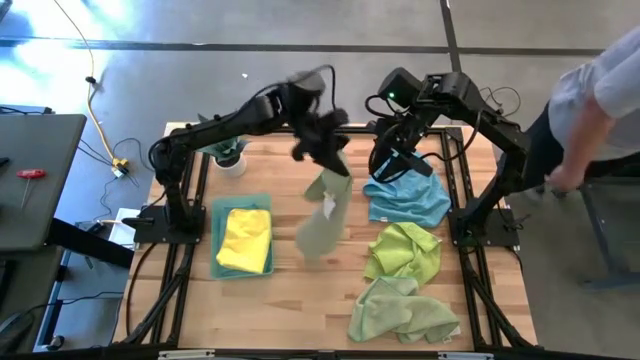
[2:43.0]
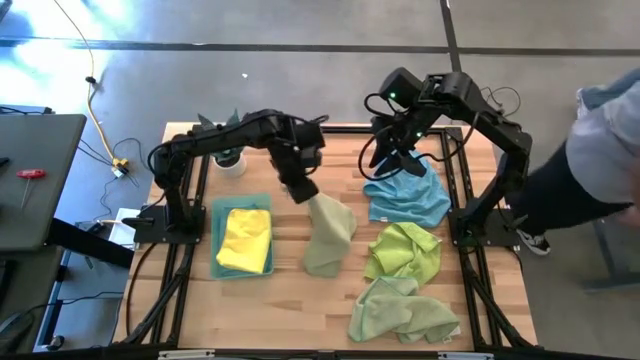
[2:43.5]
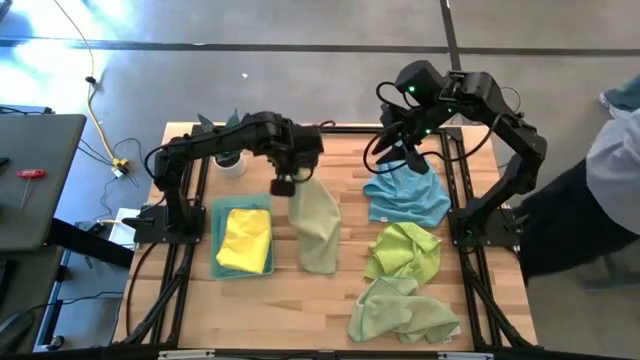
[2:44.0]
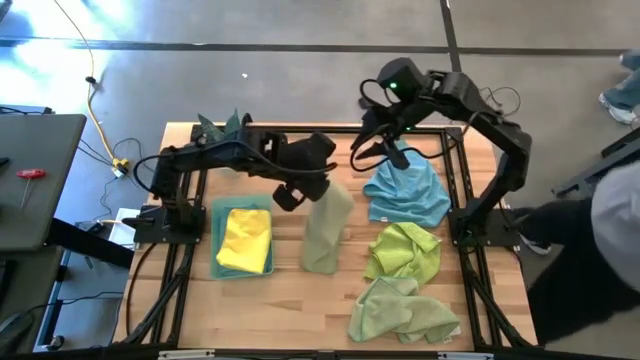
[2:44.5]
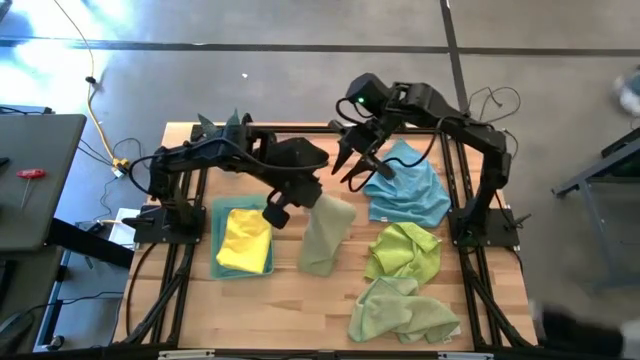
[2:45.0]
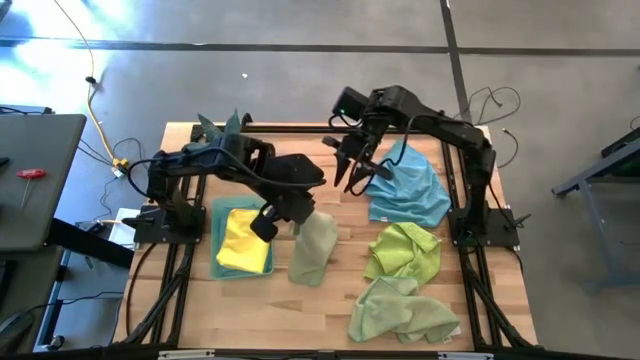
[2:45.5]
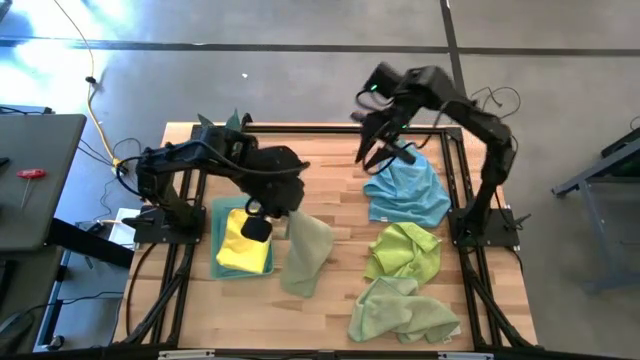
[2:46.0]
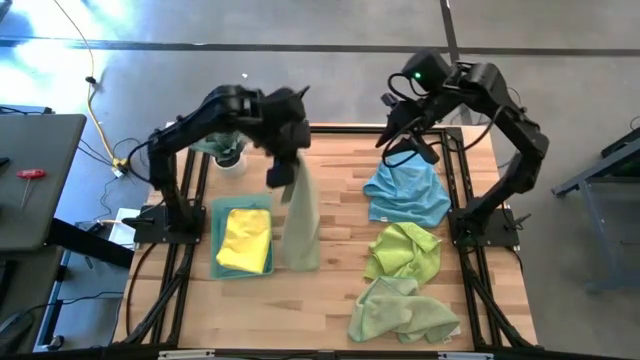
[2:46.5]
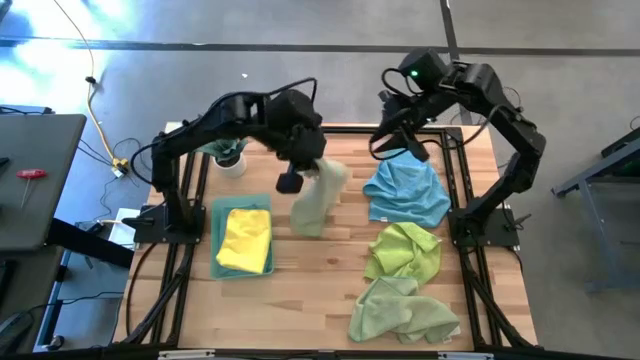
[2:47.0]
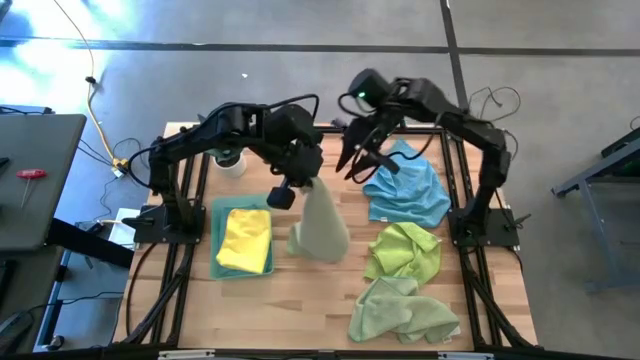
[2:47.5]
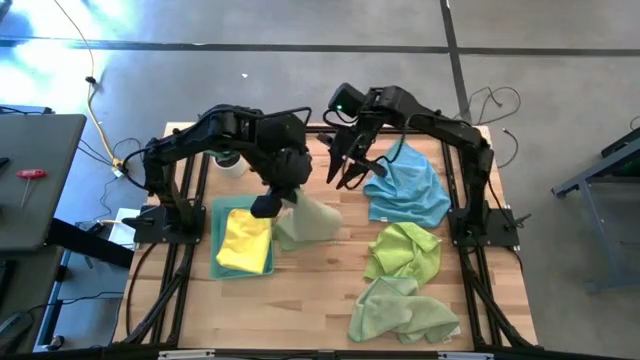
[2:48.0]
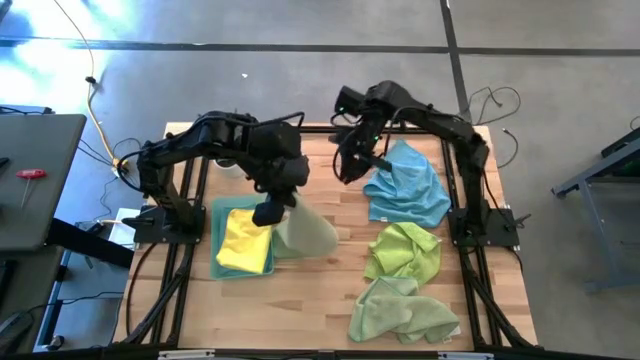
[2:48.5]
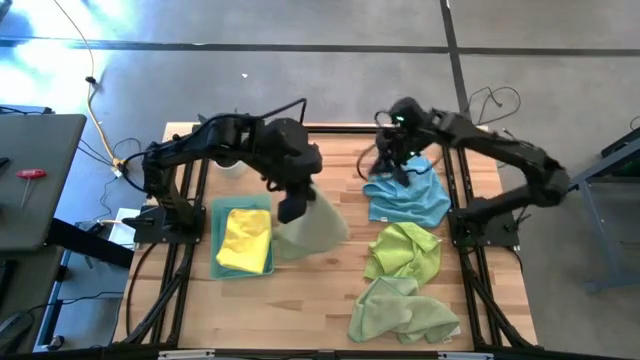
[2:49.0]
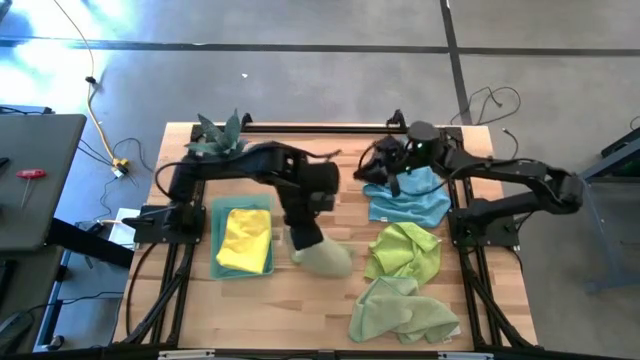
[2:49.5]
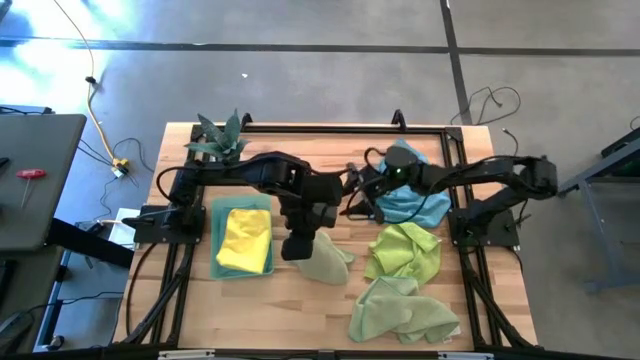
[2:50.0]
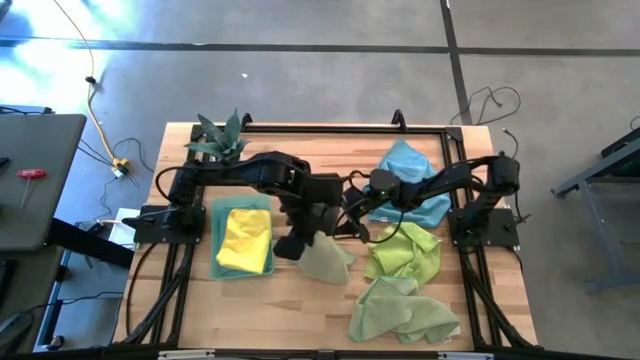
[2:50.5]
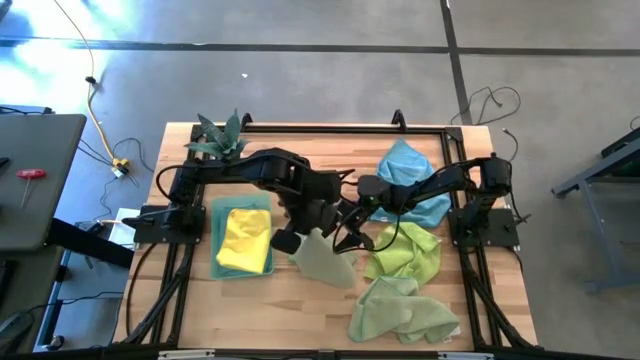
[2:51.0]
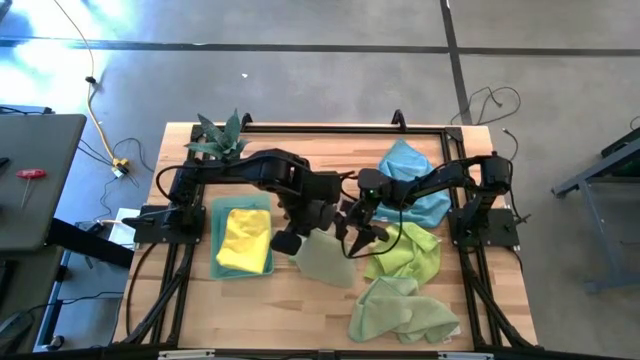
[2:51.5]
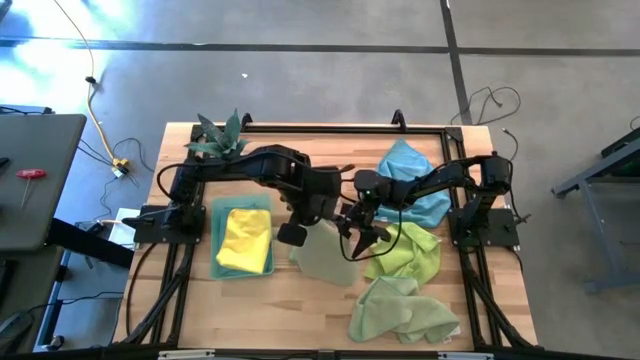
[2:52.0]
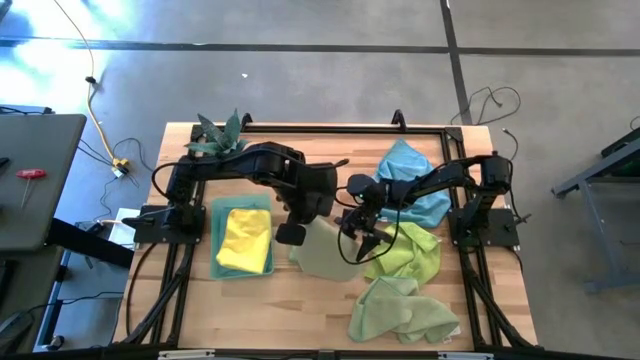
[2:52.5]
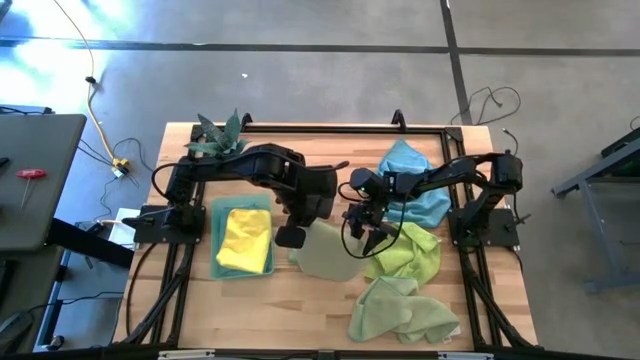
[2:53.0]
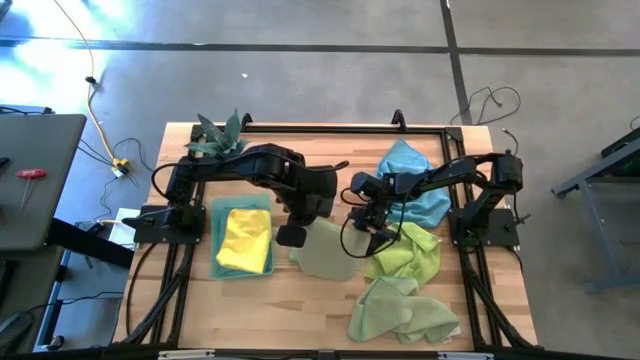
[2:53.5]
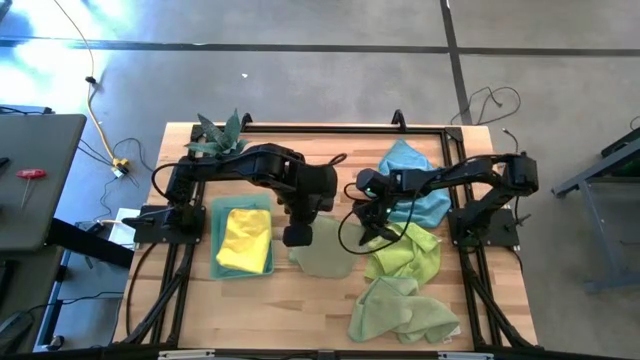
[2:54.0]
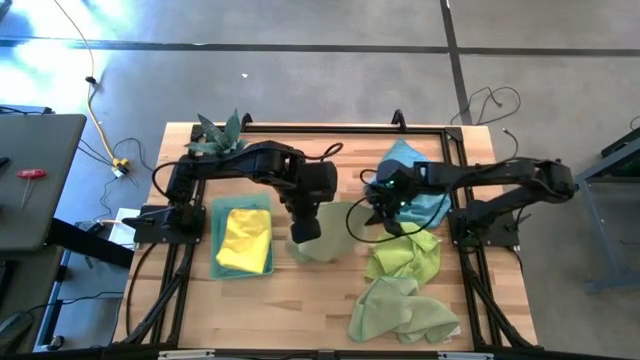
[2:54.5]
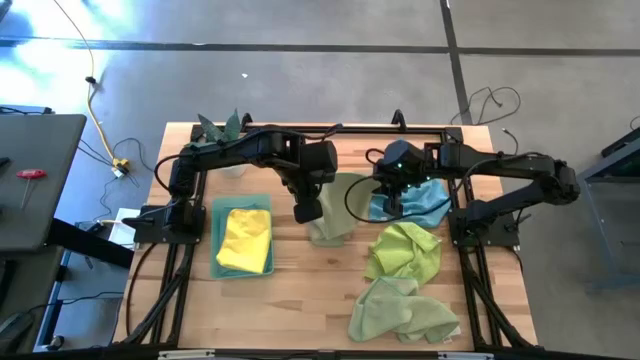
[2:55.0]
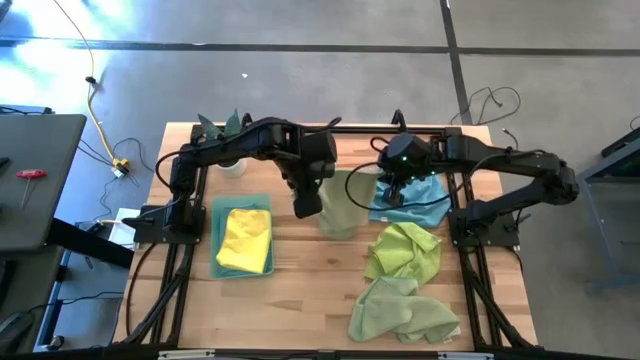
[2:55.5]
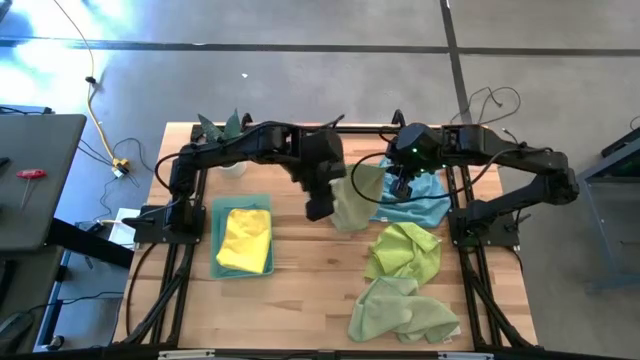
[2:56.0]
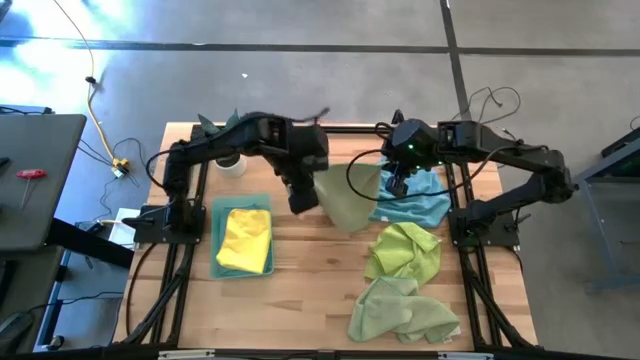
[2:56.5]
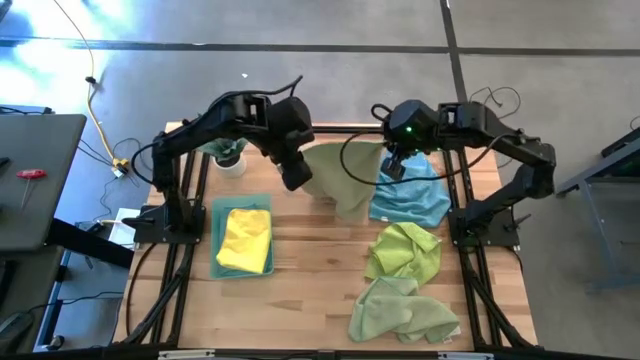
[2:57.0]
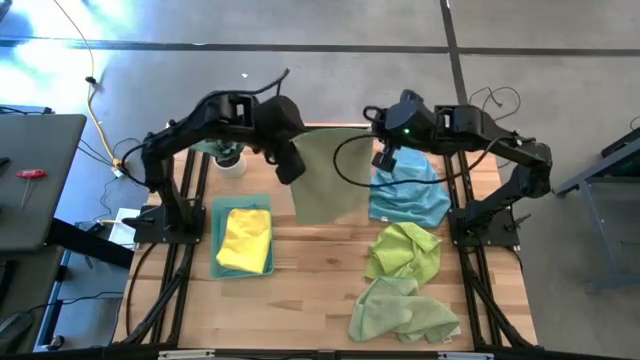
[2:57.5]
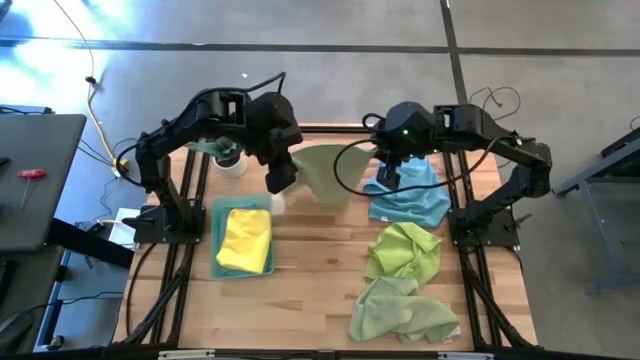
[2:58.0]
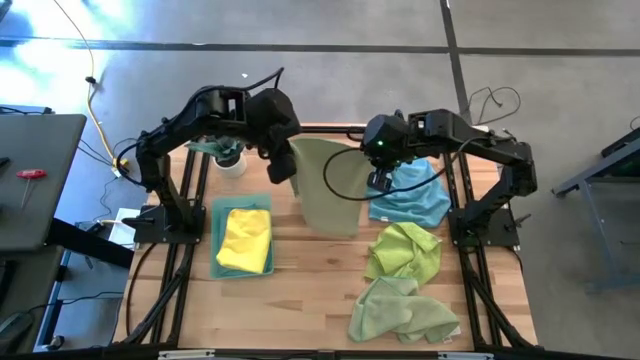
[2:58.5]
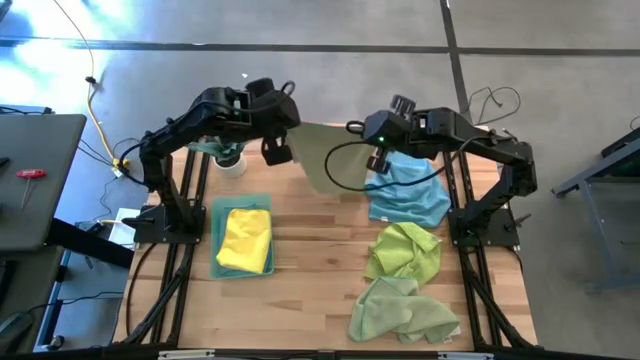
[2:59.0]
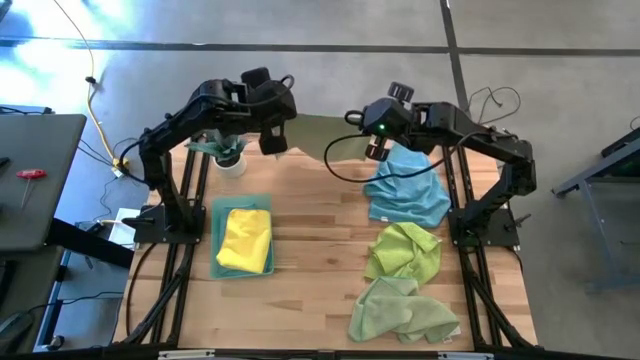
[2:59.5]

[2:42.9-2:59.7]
Task: Fold microfiber towels
Fold the top green microfiber towel
